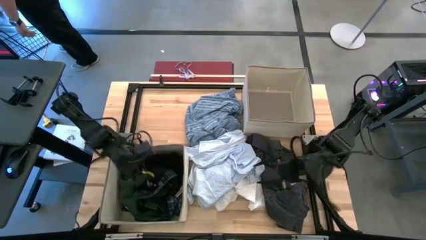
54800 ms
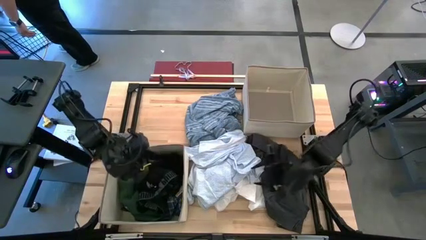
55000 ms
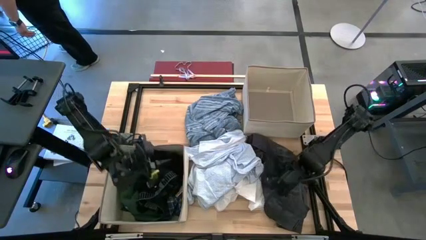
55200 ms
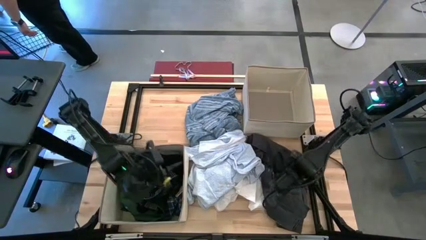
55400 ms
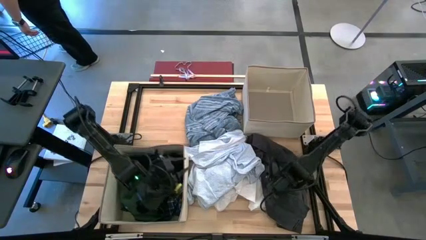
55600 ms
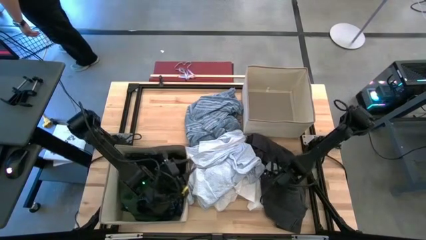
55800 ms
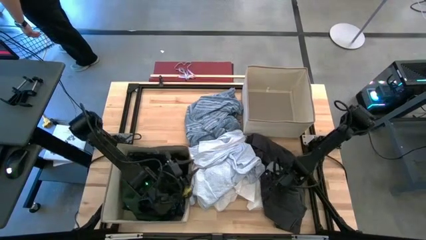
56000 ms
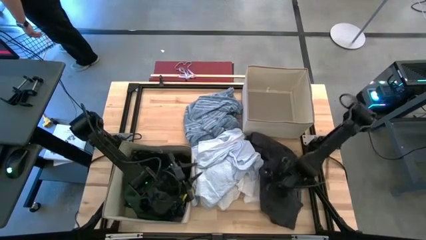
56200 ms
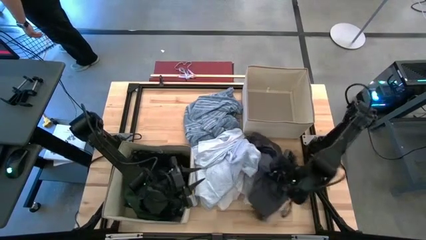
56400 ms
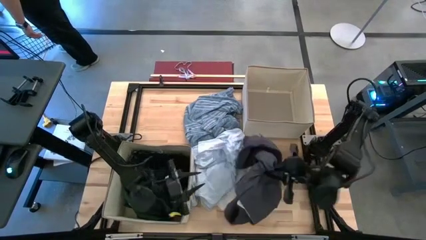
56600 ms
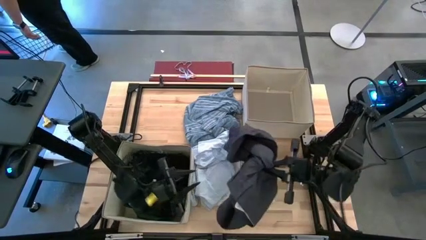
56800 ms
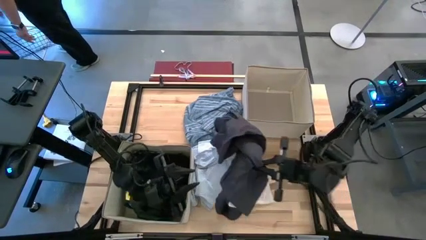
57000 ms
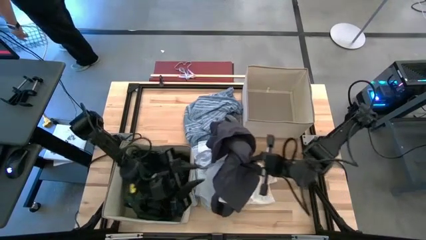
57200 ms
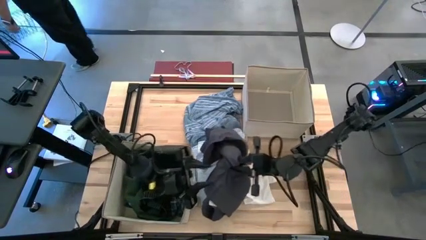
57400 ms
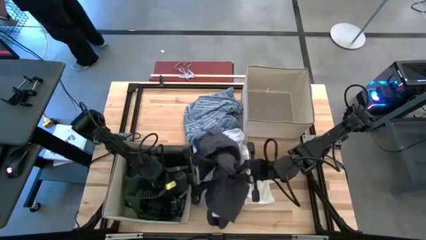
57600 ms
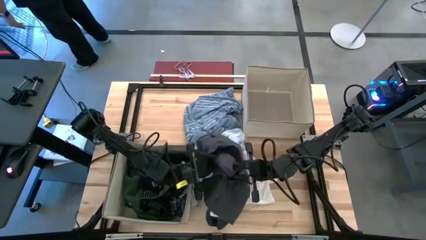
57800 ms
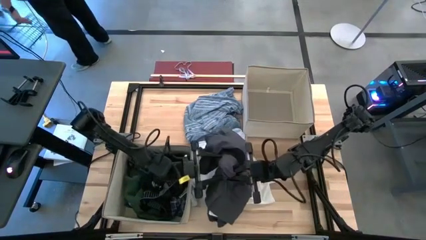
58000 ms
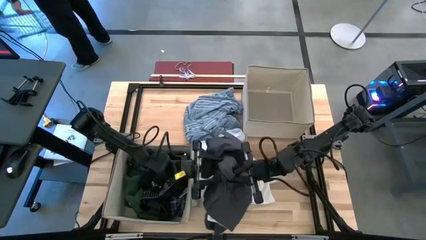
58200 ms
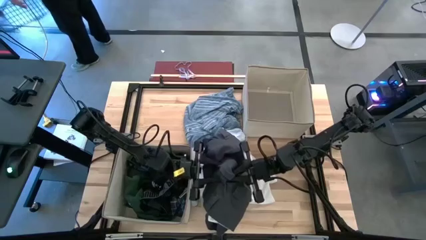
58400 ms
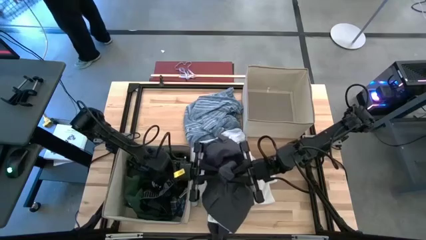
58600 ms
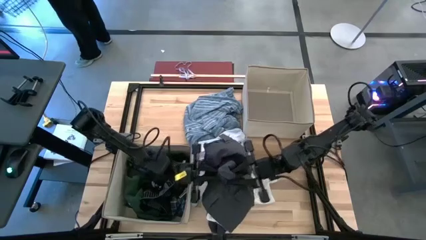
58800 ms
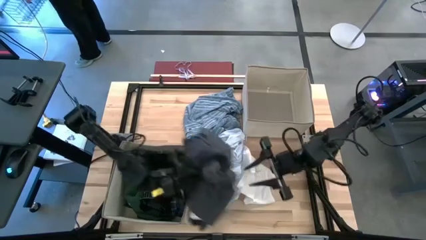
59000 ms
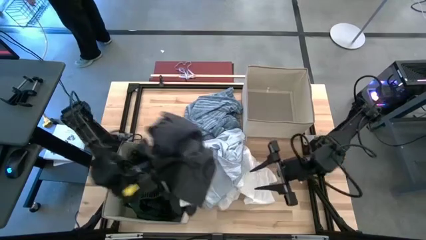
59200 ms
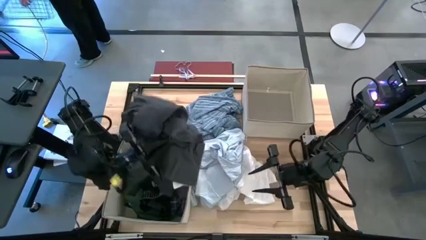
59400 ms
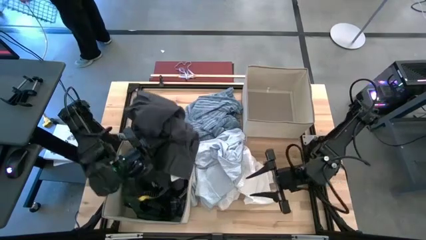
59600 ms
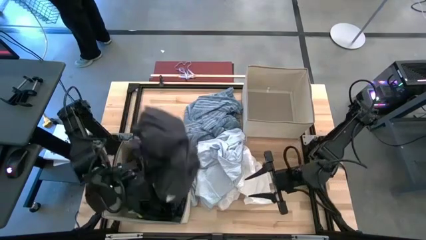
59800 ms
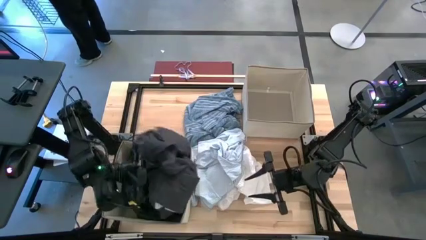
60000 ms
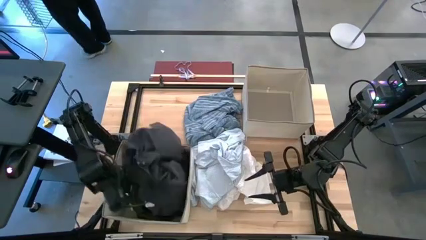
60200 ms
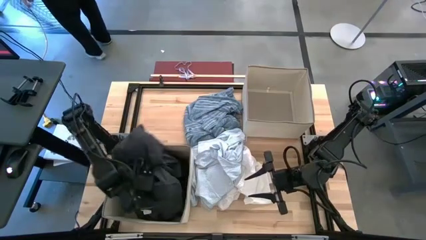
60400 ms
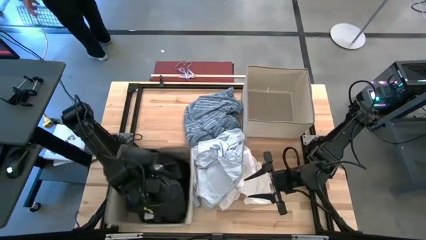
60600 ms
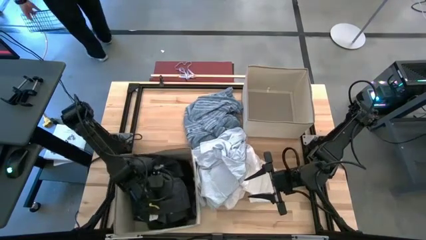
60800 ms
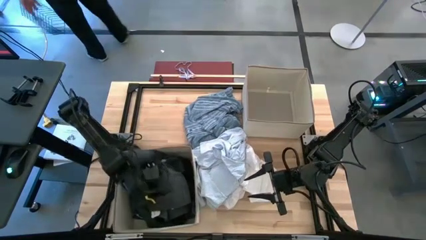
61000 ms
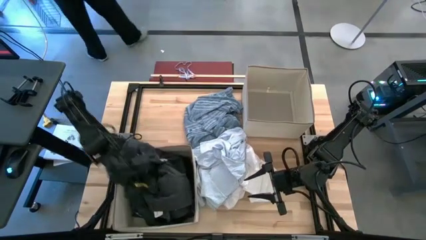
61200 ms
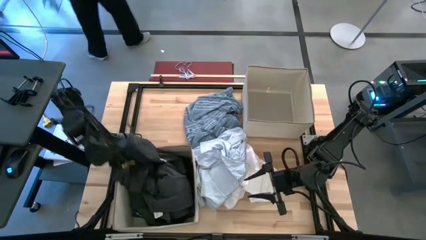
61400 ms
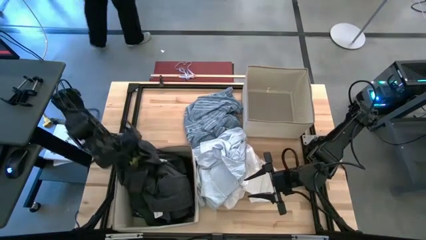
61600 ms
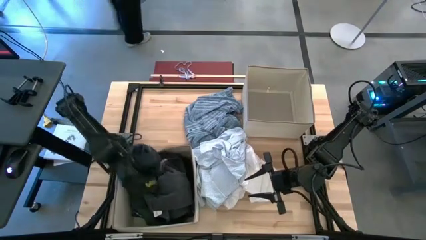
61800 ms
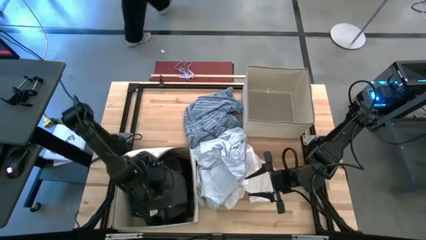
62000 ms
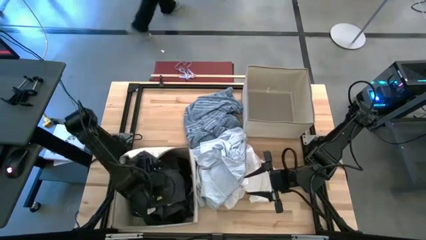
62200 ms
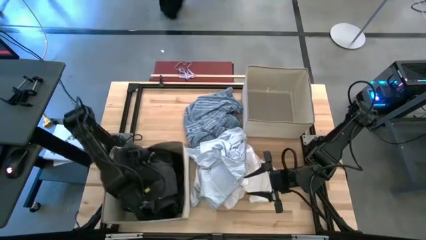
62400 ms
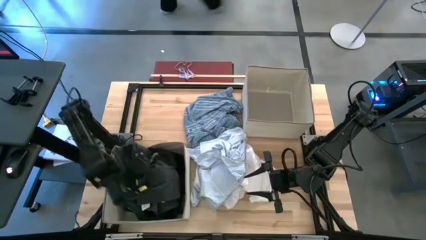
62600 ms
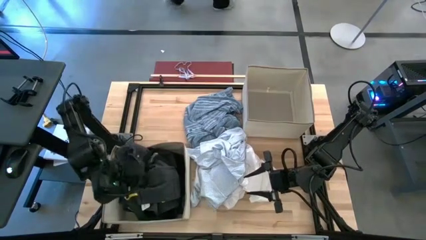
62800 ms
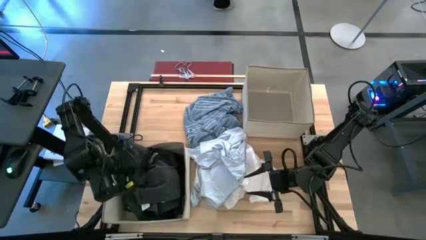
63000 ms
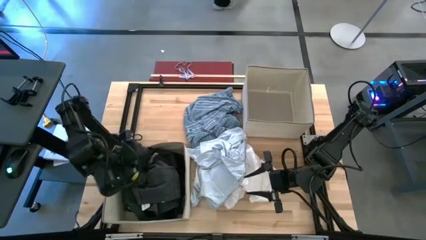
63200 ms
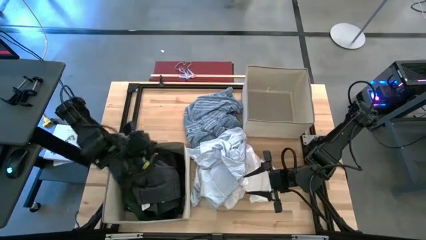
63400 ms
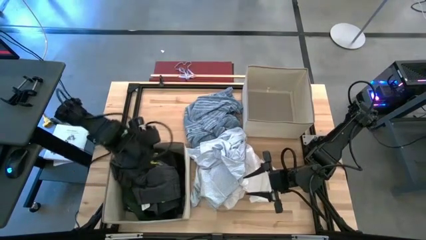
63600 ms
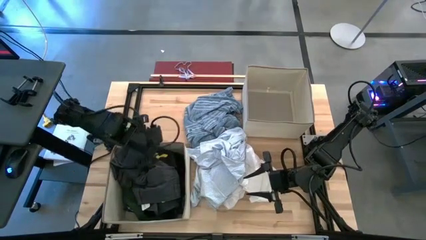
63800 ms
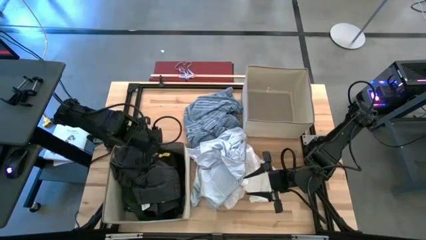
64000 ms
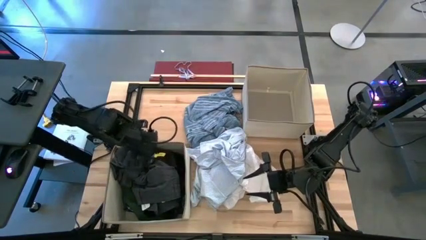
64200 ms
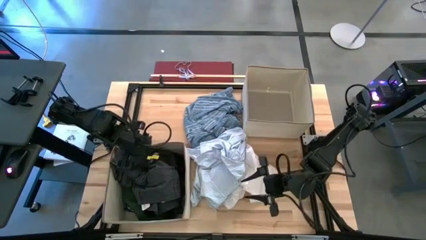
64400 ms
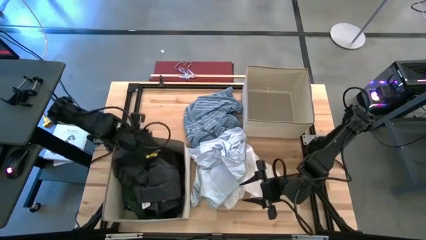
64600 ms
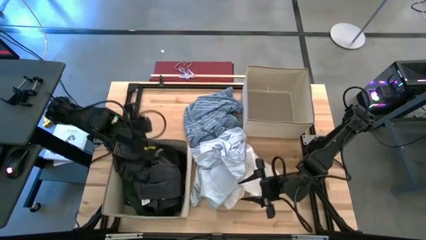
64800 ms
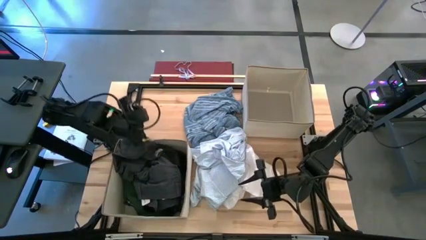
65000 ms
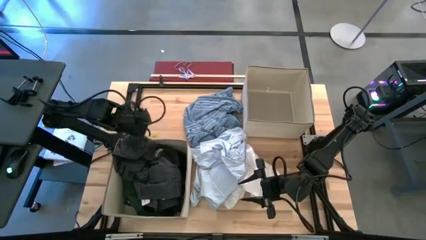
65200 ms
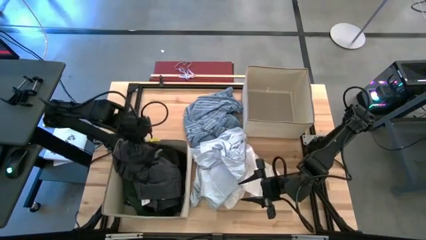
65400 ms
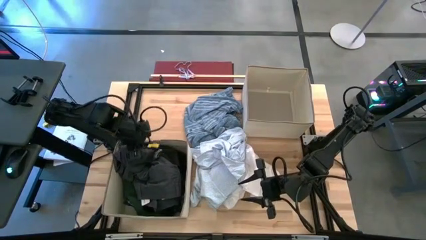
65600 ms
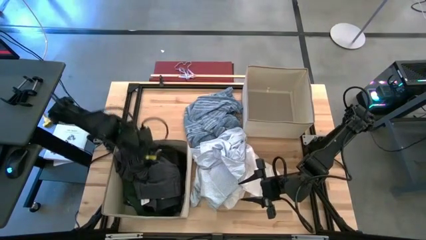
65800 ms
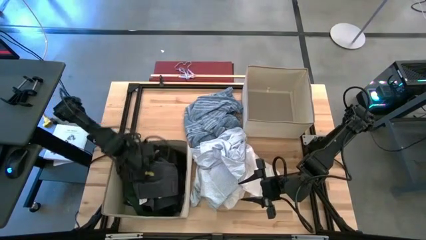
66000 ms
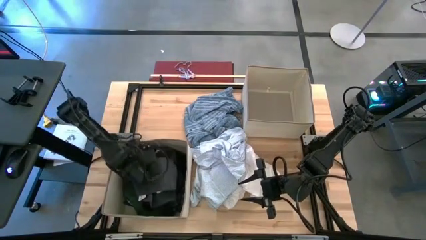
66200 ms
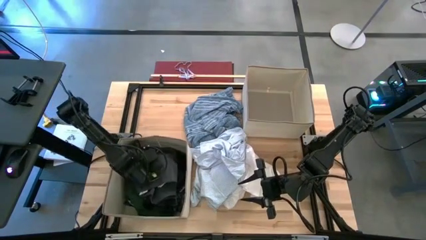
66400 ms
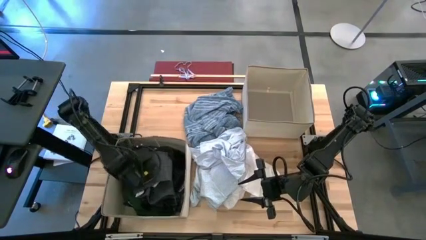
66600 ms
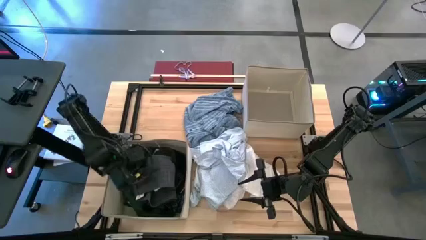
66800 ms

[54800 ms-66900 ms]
Task: Sort clothes
Put the gray pants into the bottom laundry organizer

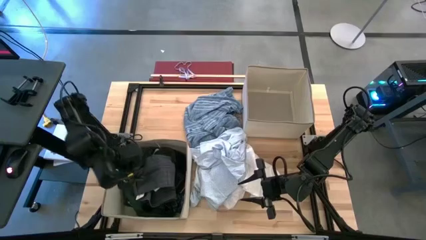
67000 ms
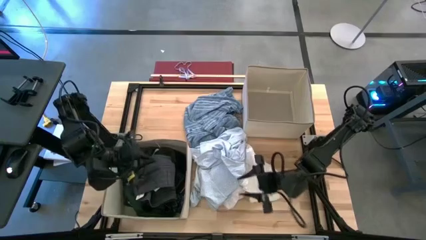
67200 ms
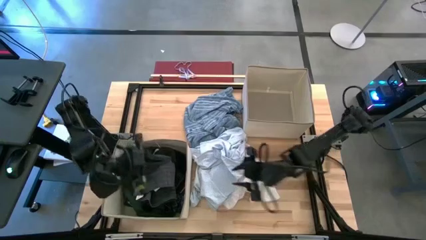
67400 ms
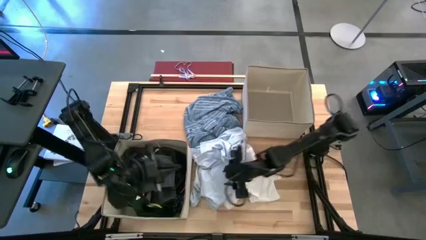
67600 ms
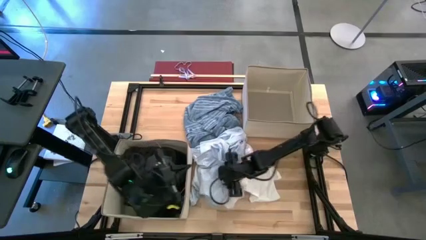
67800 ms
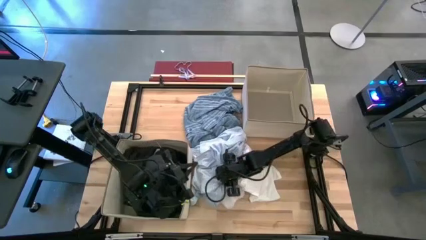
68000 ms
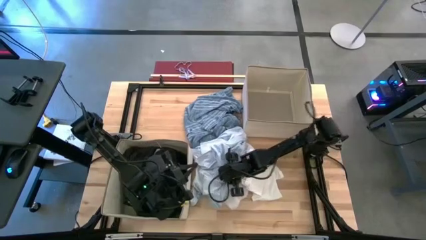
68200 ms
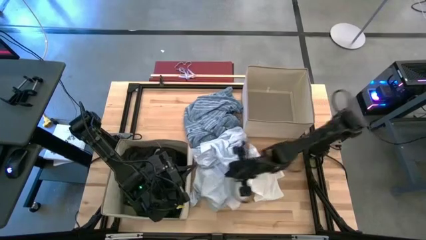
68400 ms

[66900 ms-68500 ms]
Put the blue patterned shirt into the top laundry organizer
